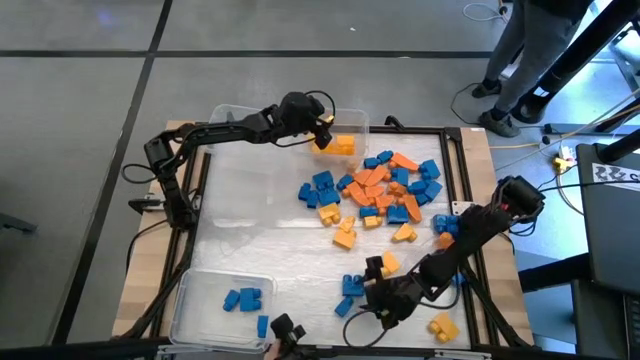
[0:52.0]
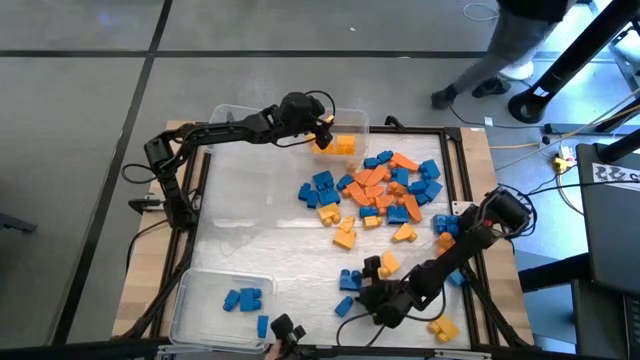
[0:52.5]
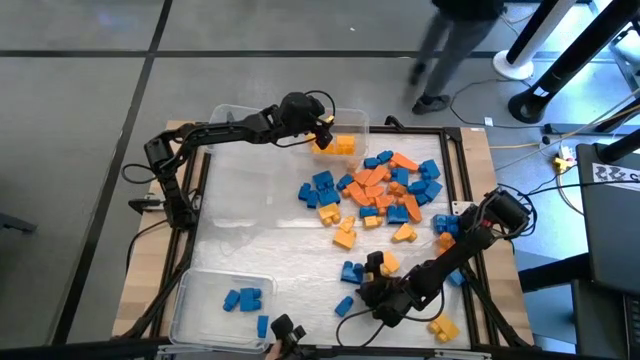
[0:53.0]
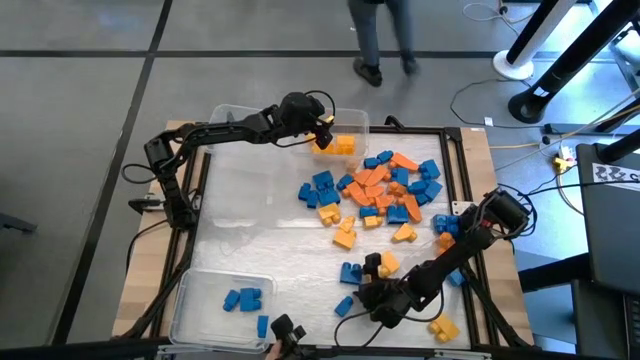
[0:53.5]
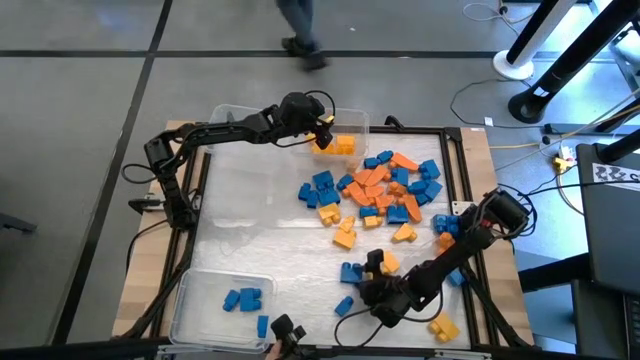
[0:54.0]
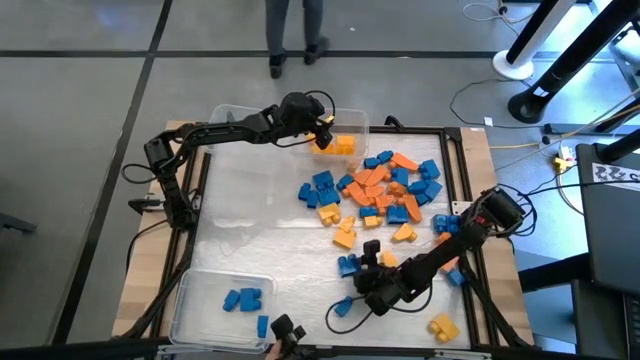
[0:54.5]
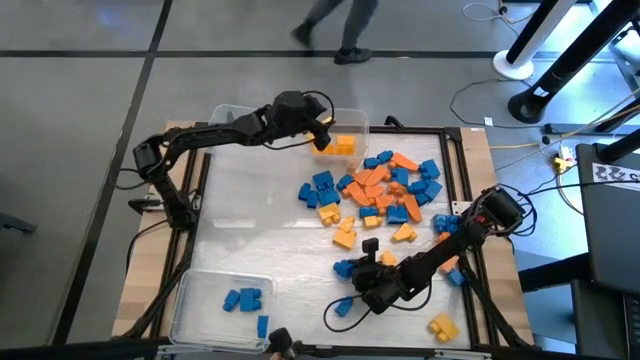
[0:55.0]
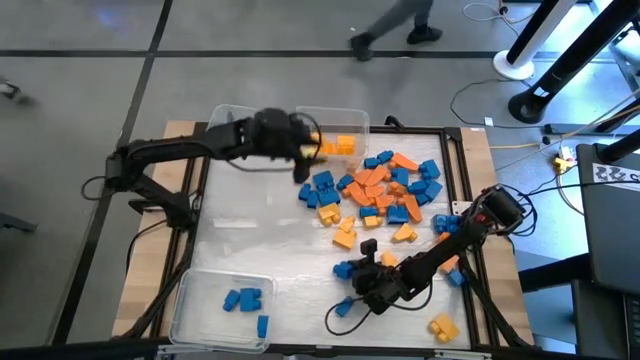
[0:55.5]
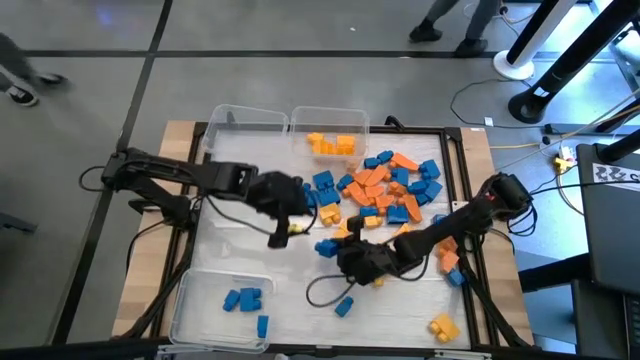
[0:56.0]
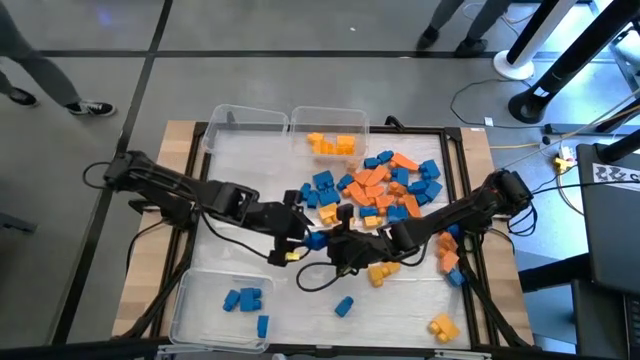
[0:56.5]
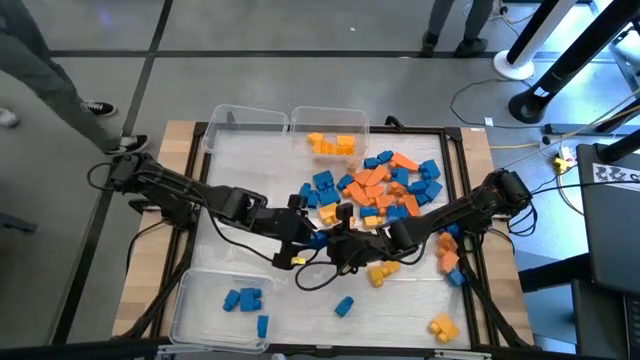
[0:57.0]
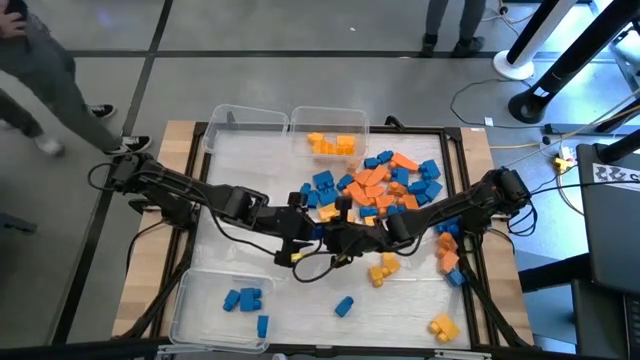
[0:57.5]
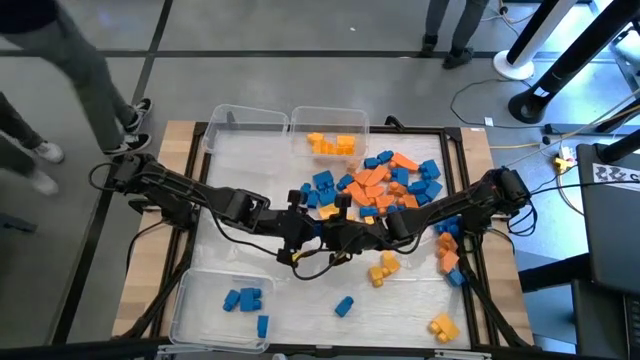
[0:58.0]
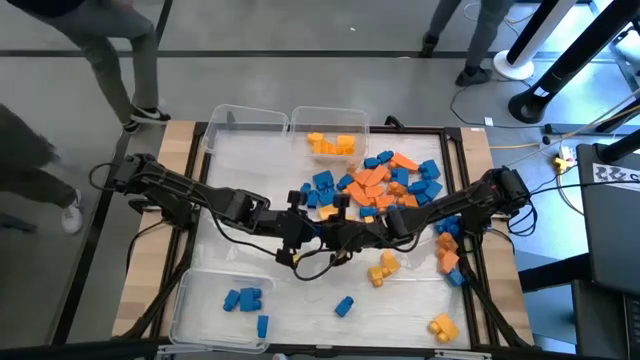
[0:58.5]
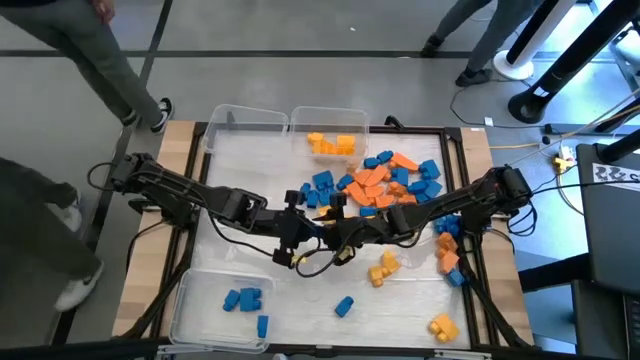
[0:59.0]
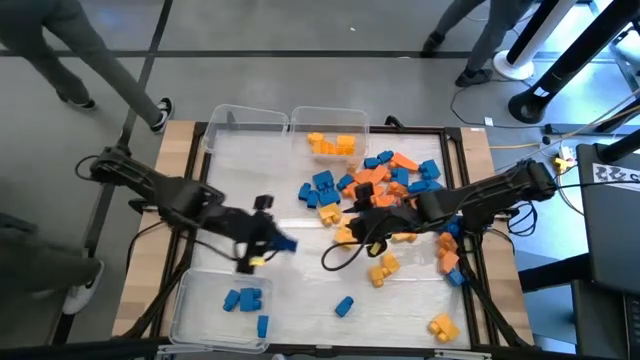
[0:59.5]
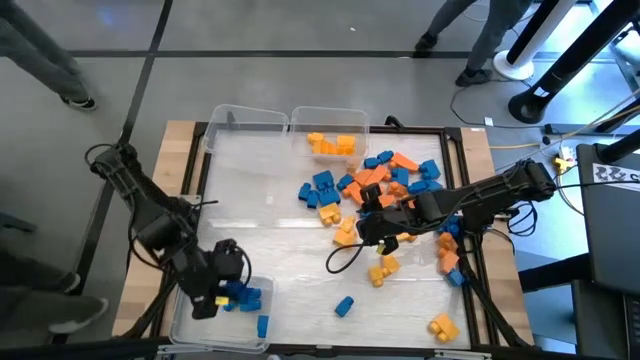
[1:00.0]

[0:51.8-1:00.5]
Task: Sort blocks
Put the blue game piece into the bottom transparent bin

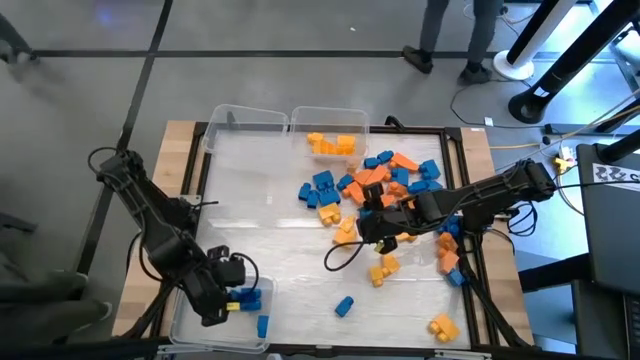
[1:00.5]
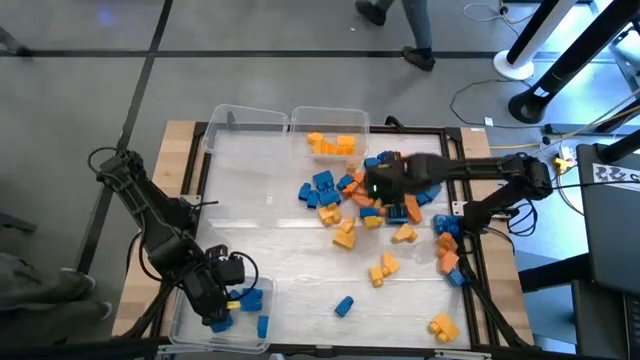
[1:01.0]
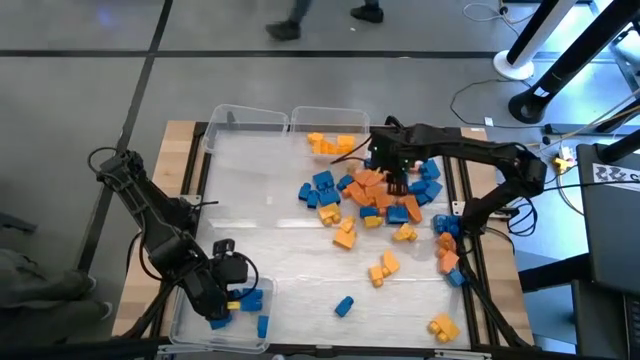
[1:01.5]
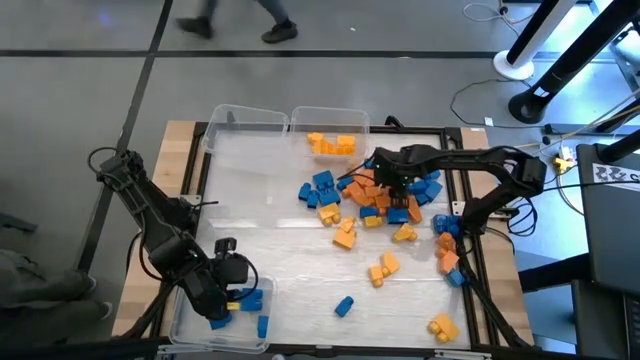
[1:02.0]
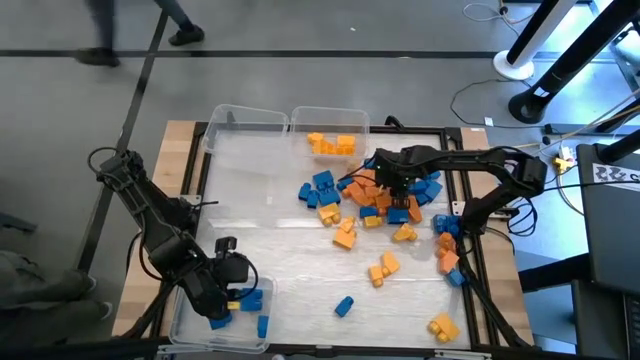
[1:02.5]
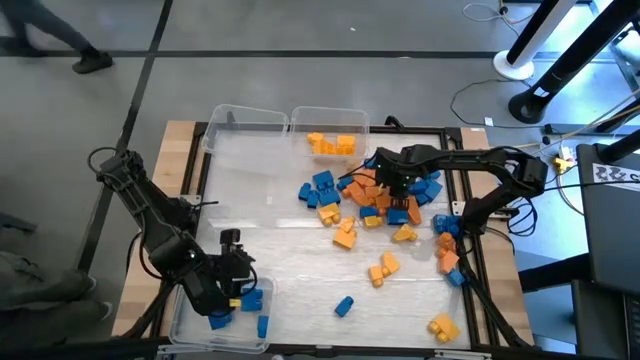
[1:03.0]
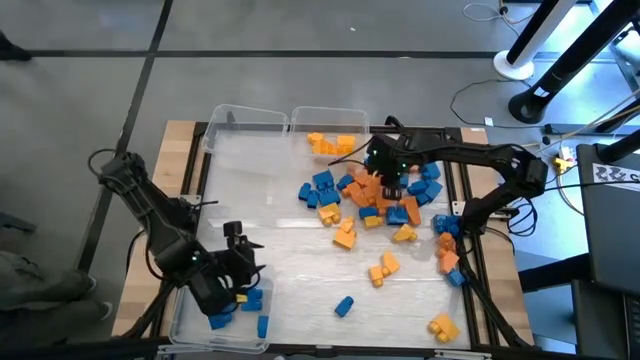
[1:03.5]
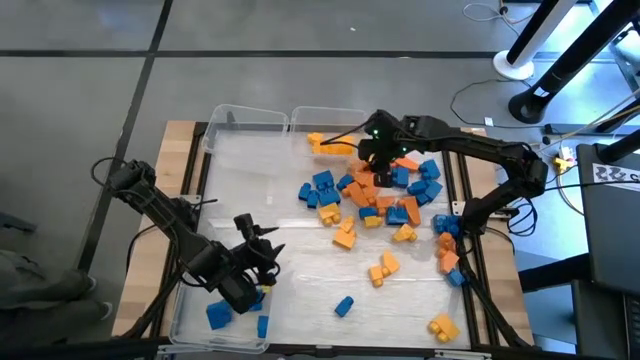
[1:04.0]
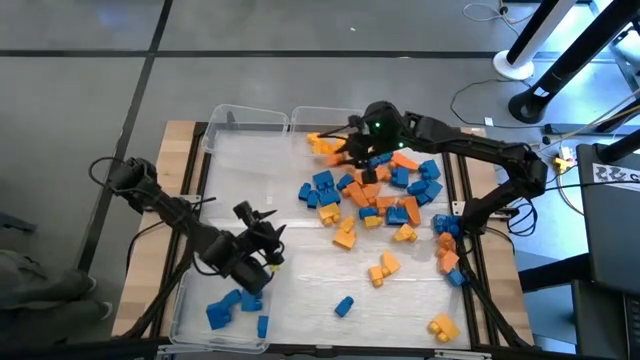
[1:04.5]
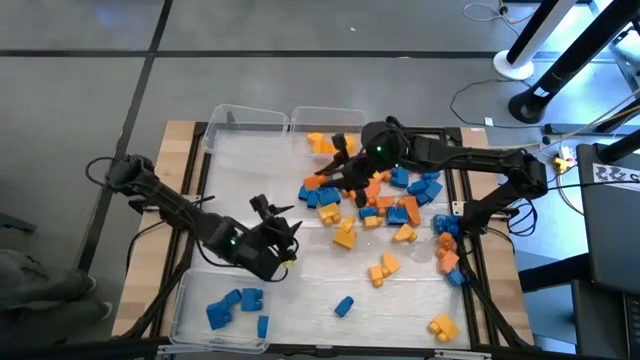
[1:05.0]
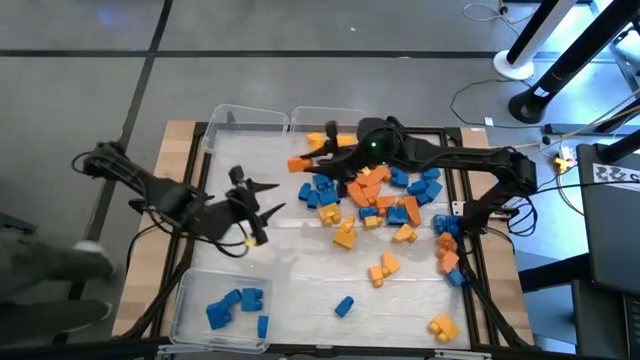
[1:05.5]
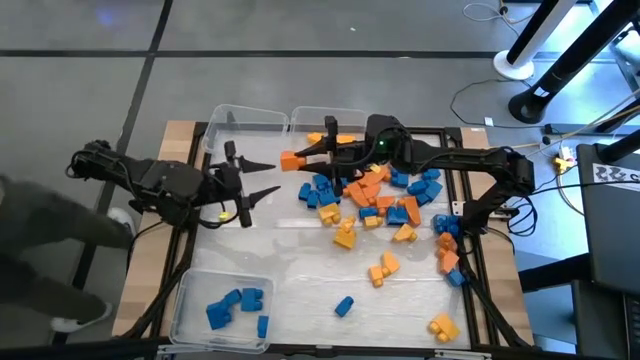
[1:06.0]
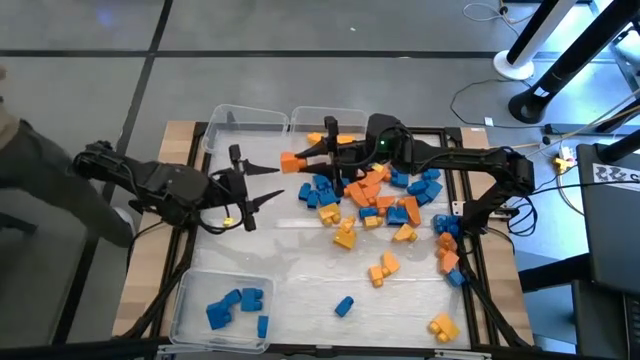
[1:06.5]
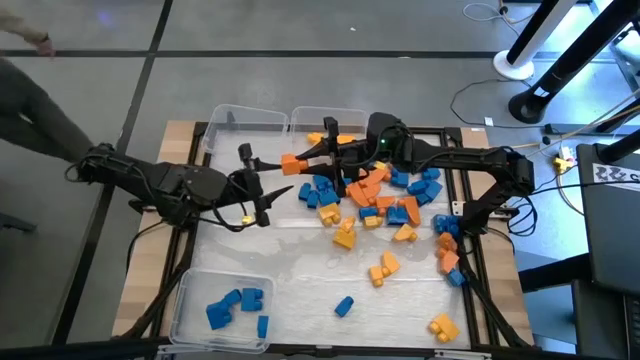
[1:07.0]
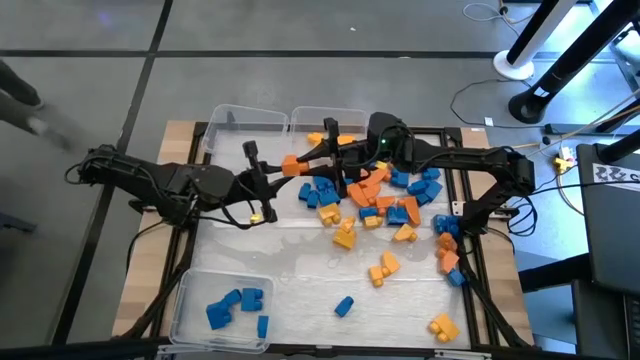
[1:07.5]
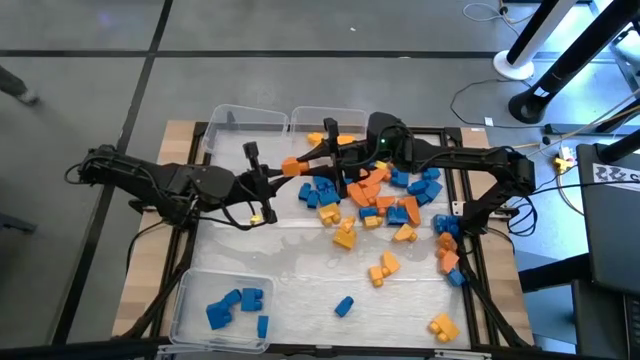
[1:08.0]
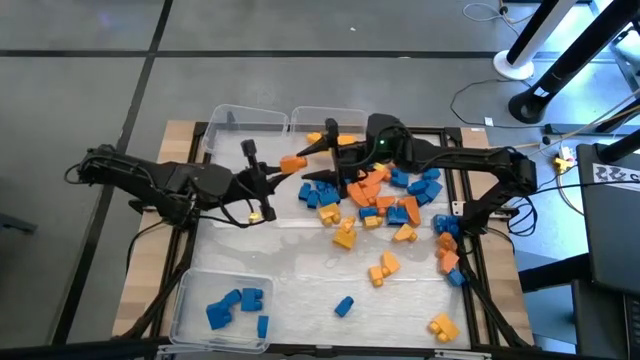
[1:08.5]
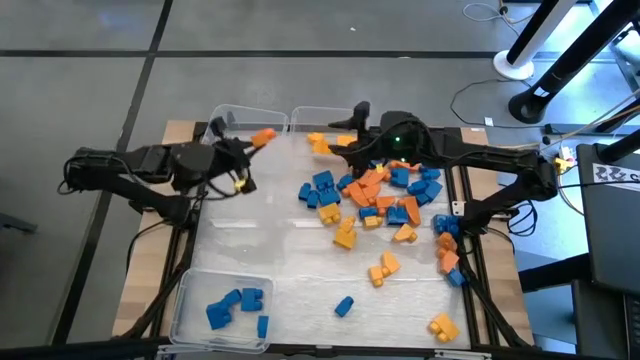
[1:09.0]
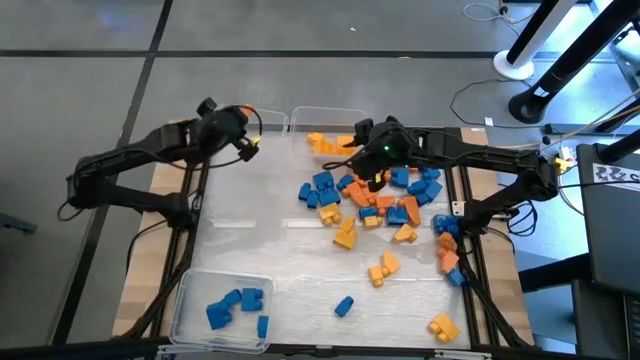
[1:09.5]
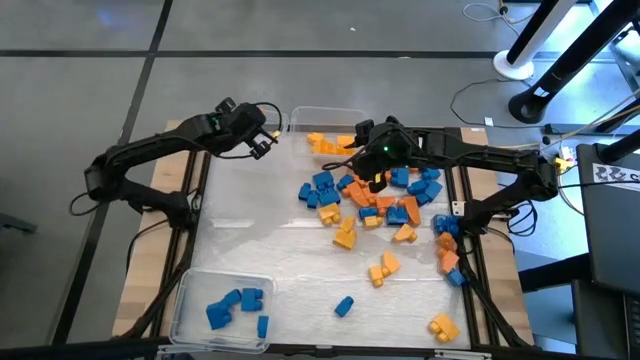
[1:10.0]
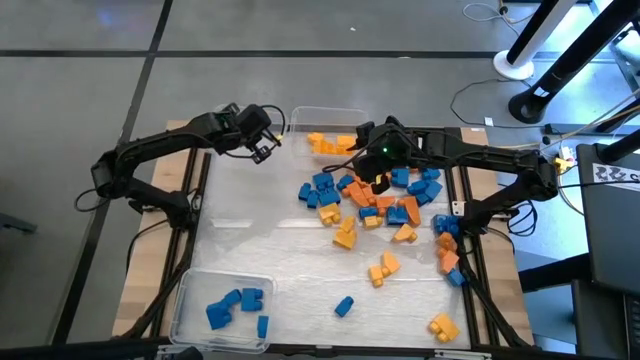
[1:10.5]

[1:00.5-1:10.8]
Put the orange game piece into the top left transparent bin

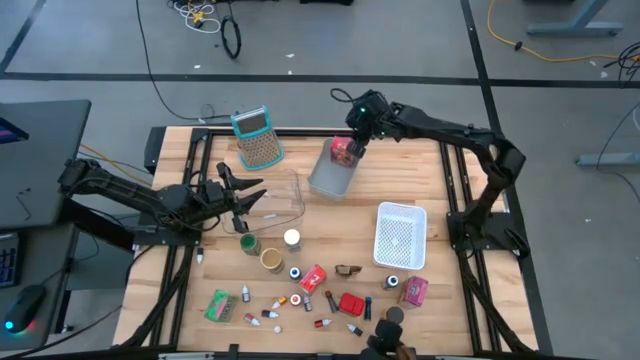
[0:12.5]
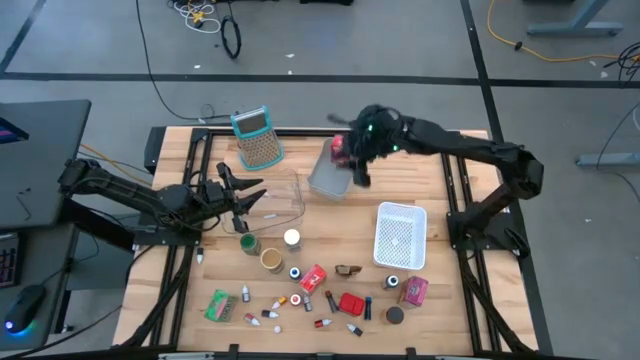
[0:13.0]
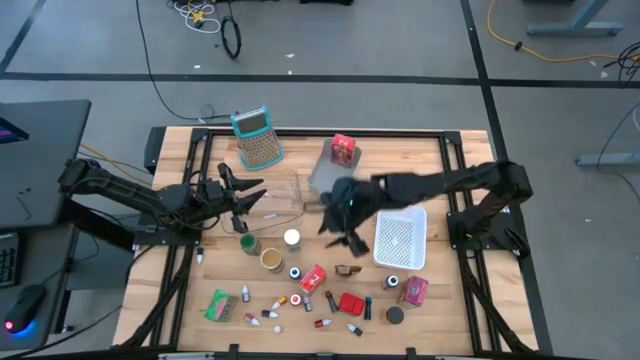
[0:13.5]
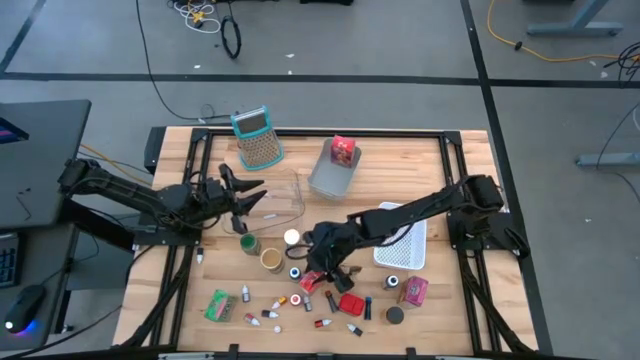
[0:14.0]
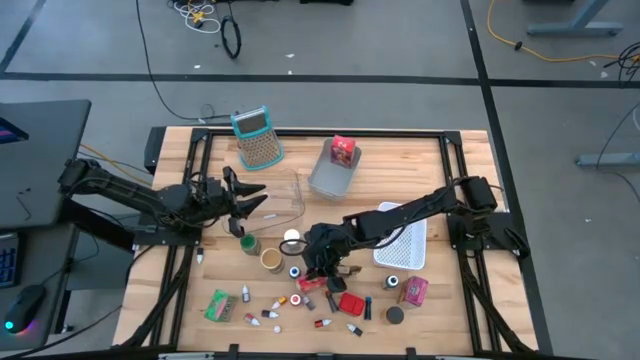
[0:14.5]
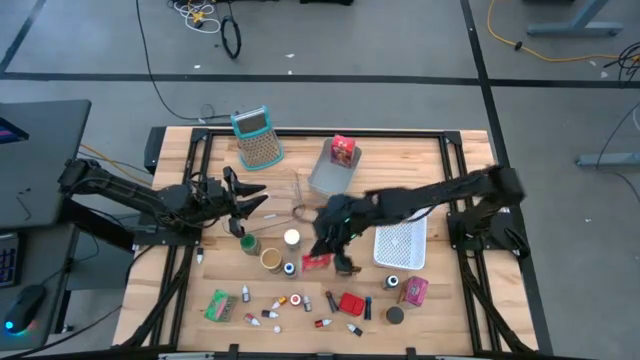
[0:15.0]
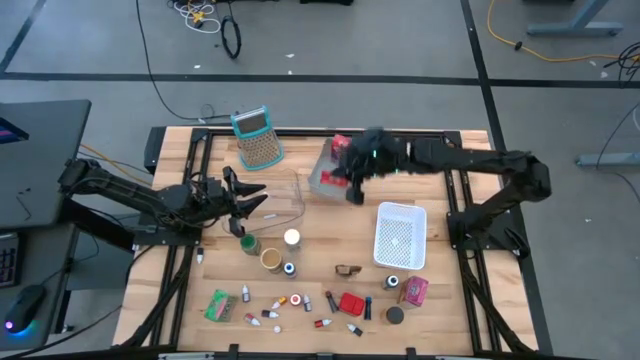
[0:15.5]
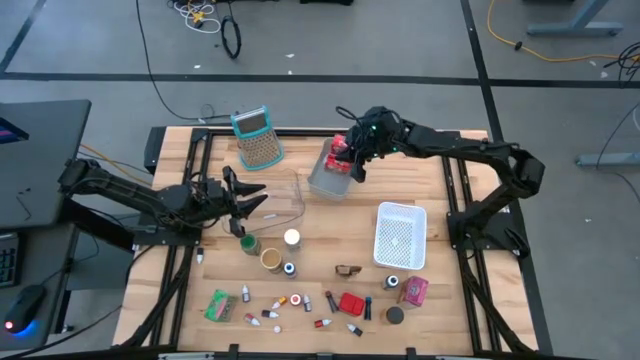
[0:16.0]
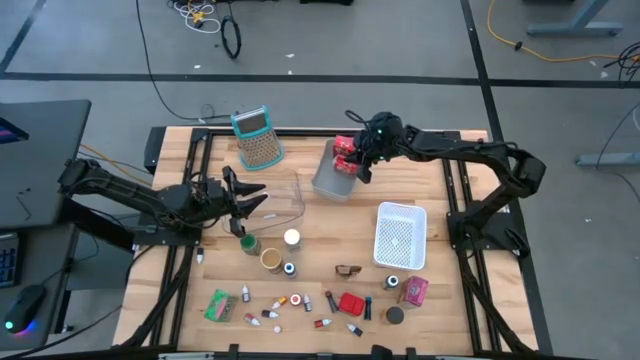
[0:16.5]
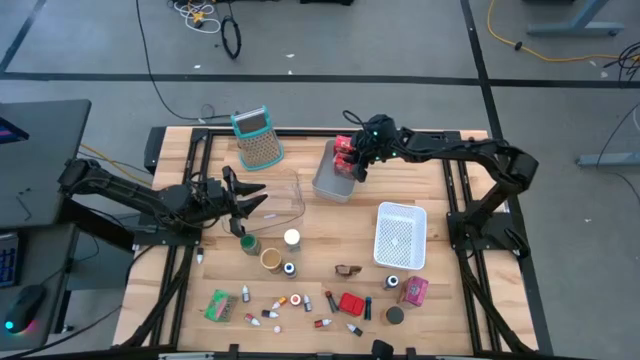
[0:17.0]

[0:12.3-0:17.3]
Task: Pick & Place Kitchen Items
Put the red cereal box into the gray bin
